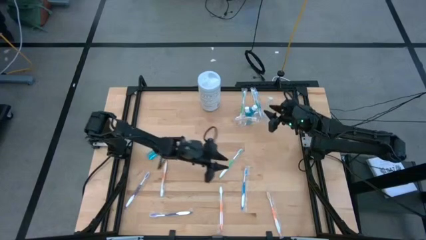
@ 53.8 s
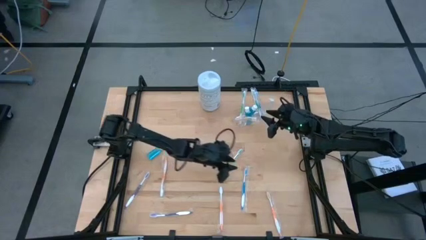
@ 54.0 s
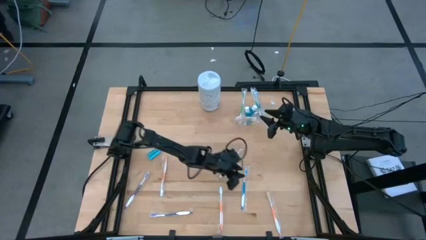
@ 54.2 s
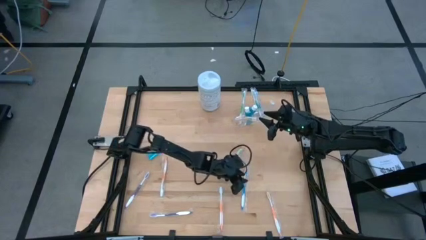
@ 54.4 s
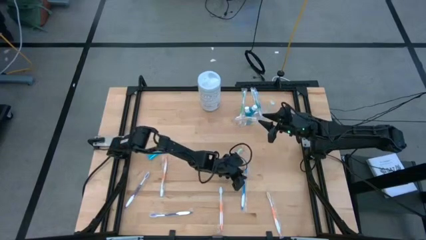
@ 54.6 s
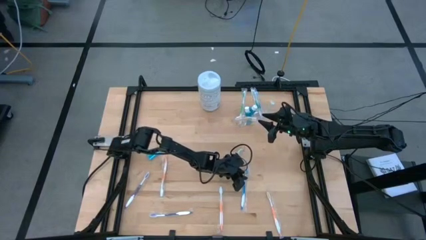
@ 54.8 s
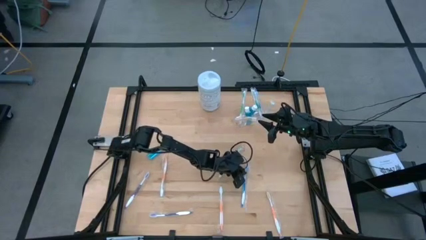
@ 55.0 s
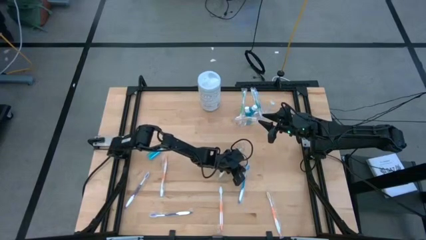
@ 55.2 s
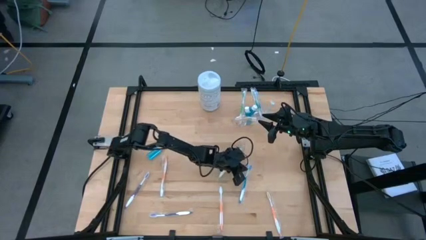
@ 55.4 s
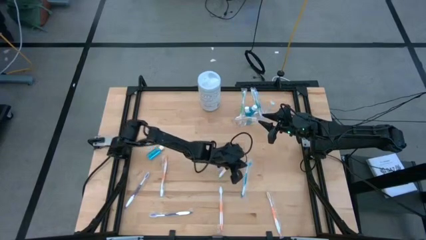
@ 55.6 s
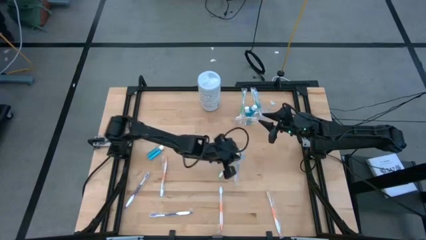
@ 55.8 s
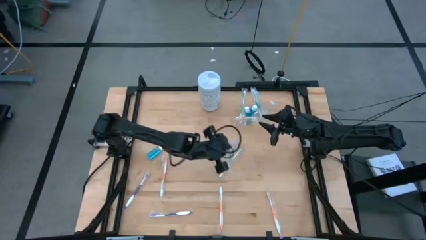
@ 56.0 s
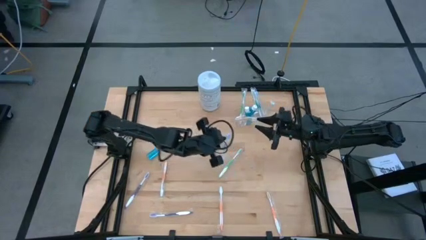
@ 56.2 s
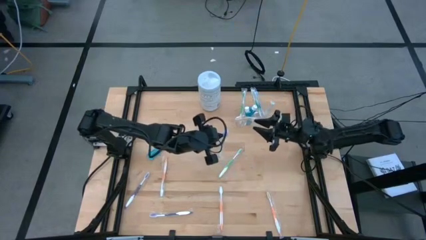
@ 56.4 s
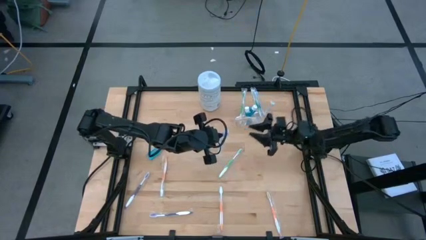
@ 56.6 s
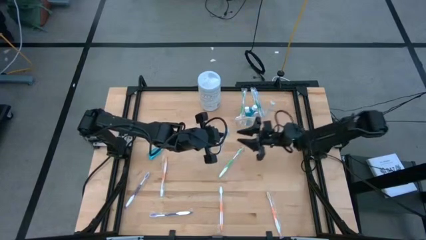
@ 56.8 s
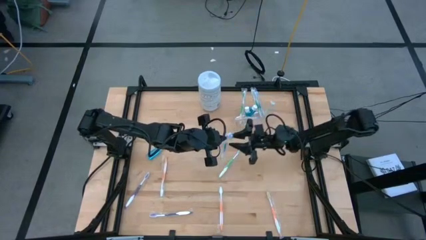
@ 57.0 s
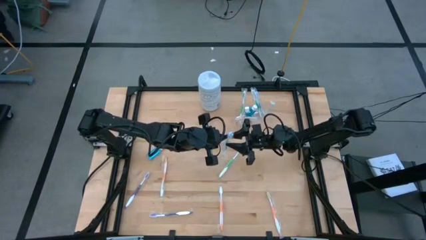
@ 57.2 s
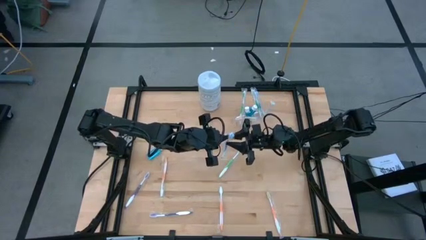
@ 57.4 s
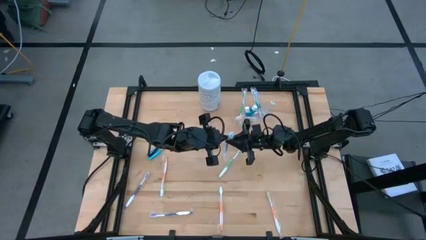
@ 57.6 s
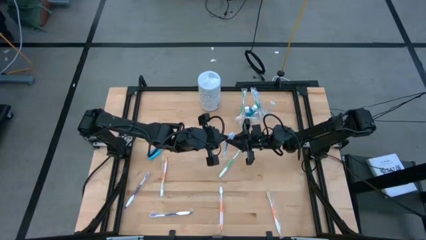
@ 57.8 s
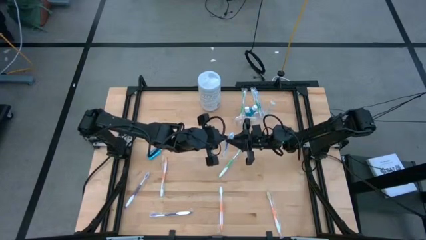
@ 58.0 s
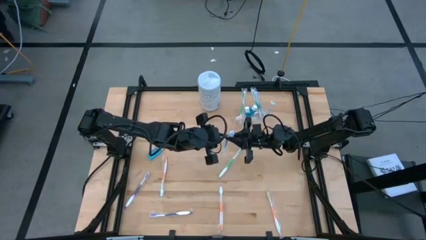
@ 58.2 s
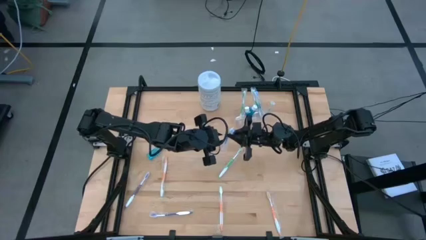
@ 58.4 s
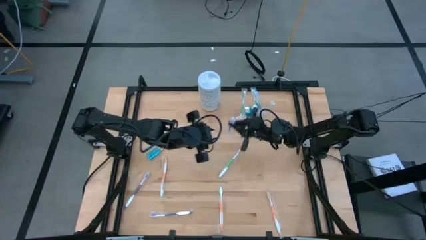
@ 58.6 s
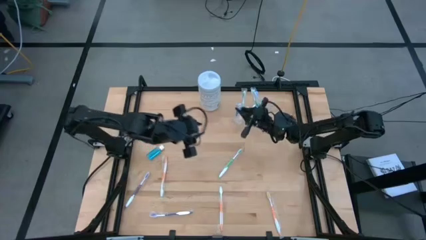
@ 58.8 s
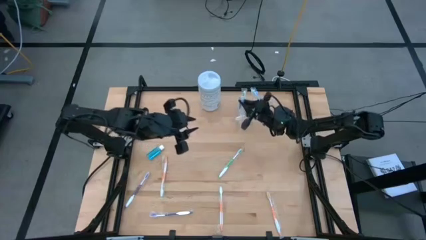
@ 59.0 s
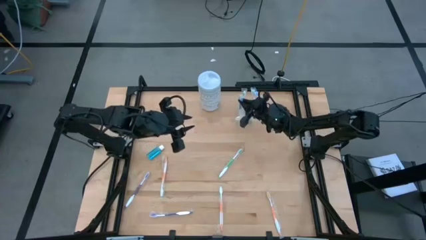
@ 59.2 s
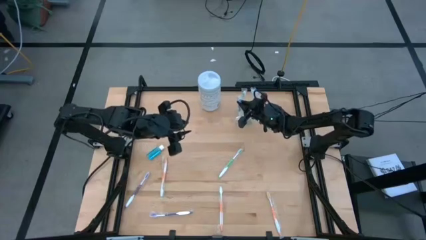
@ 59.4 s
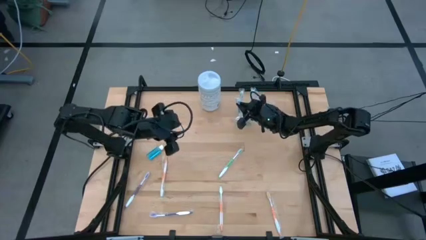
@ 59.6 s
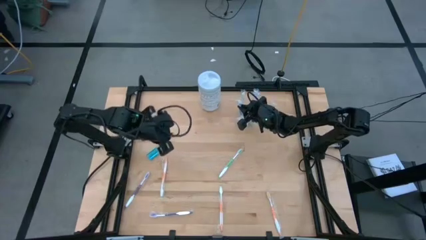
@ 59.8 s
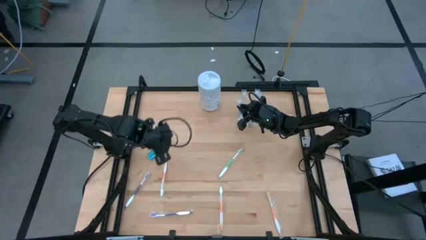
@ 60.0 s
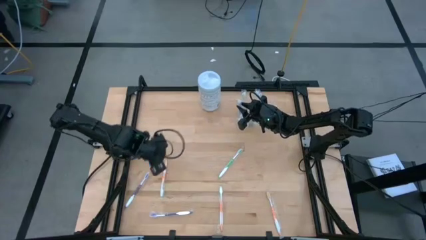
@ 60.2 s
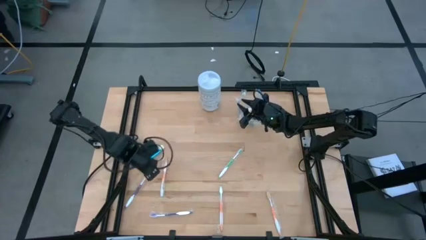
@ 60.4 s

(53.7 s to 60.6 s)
Task: Pick & Place toothbrushing station
Put the white and blue toothbrush into the transparent mesh organizer

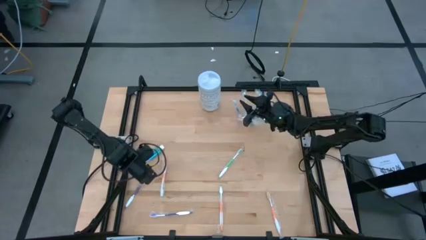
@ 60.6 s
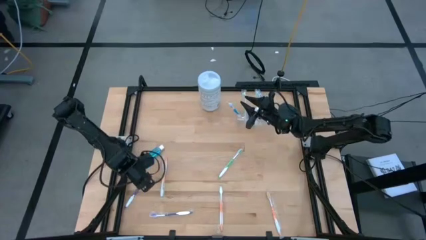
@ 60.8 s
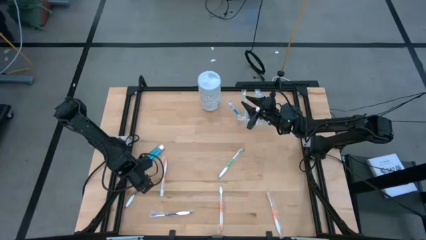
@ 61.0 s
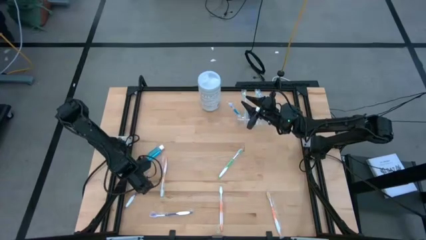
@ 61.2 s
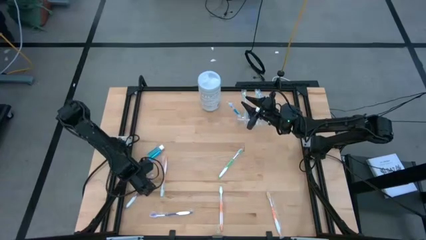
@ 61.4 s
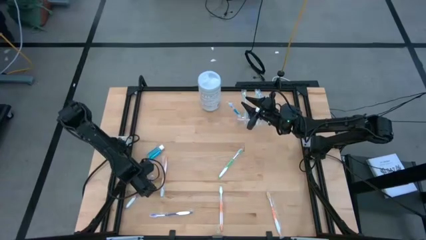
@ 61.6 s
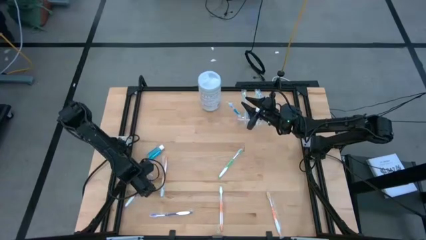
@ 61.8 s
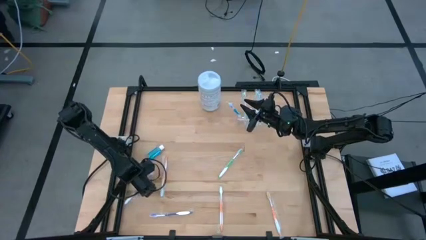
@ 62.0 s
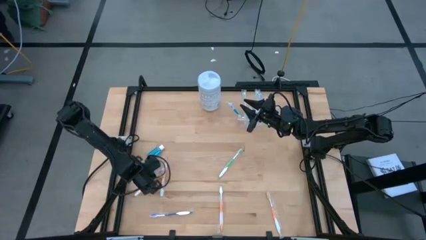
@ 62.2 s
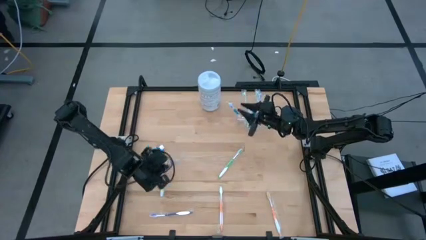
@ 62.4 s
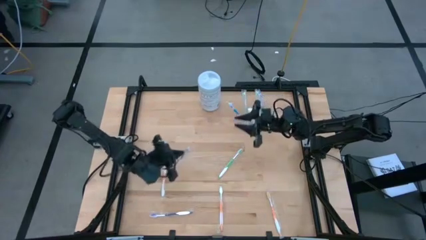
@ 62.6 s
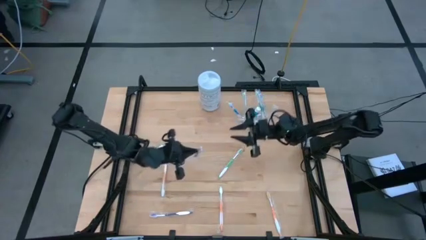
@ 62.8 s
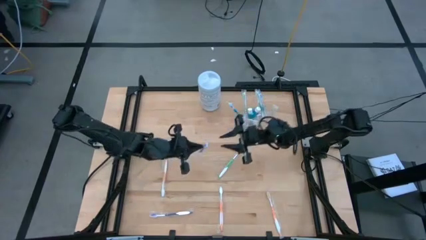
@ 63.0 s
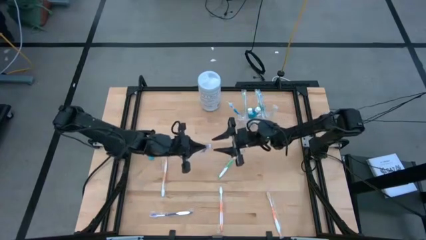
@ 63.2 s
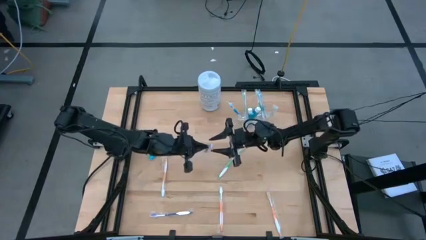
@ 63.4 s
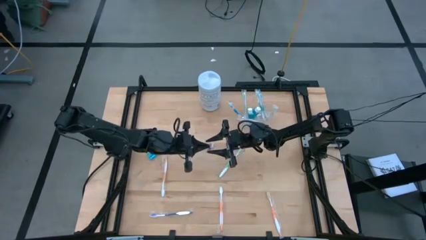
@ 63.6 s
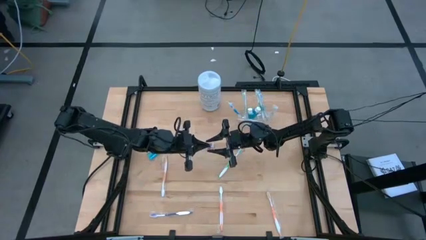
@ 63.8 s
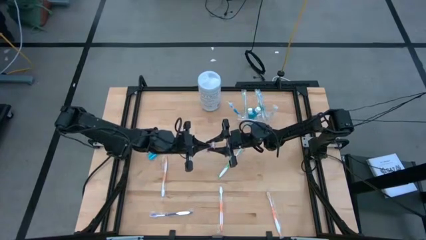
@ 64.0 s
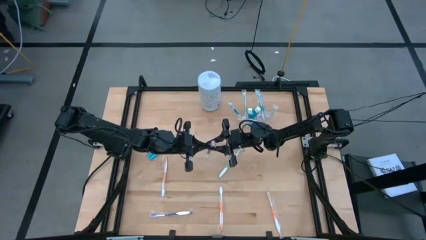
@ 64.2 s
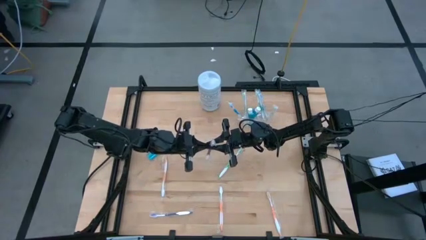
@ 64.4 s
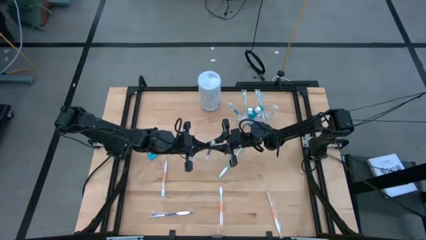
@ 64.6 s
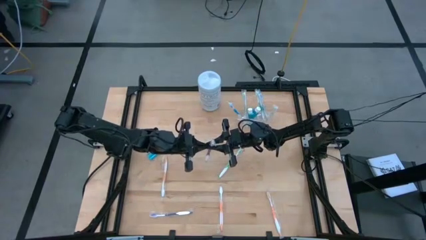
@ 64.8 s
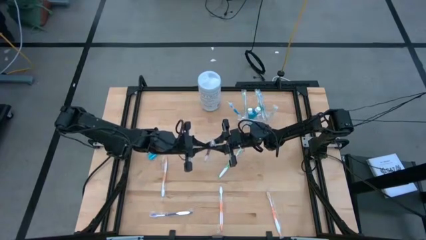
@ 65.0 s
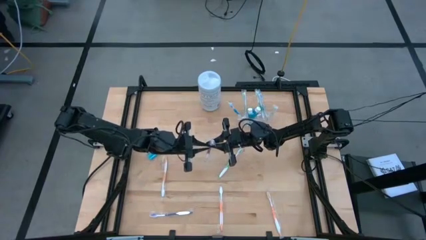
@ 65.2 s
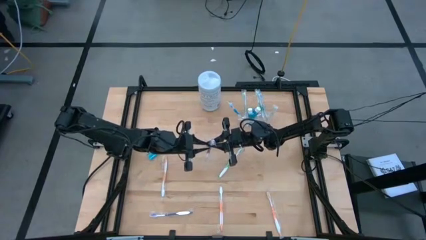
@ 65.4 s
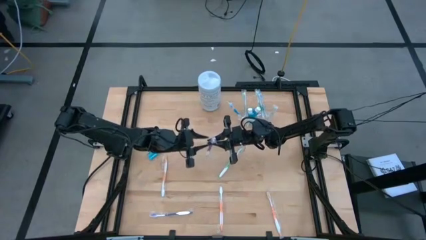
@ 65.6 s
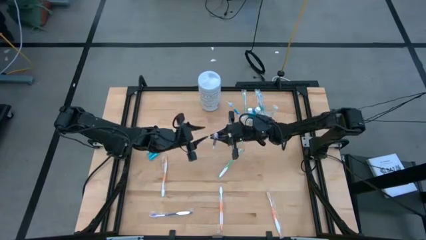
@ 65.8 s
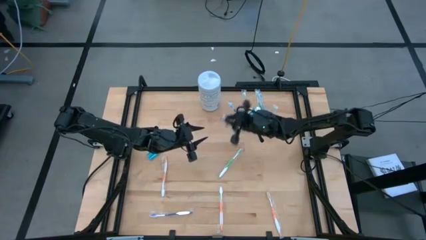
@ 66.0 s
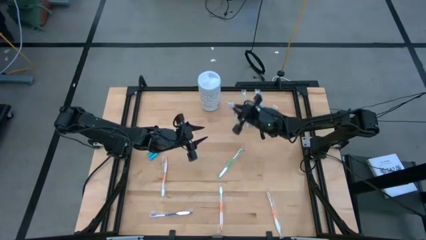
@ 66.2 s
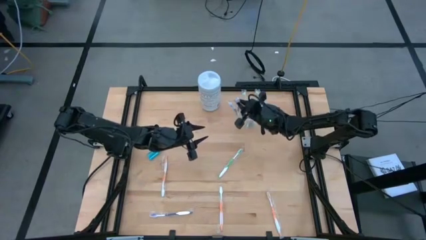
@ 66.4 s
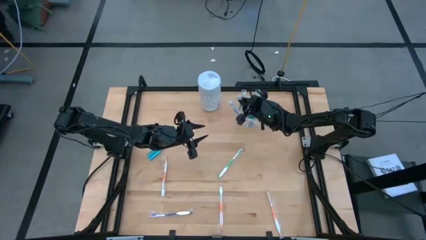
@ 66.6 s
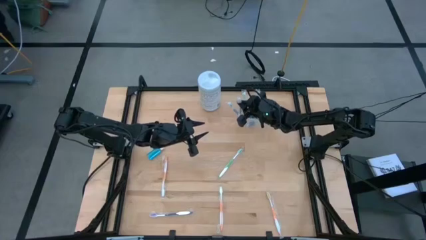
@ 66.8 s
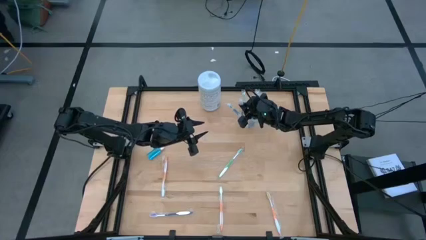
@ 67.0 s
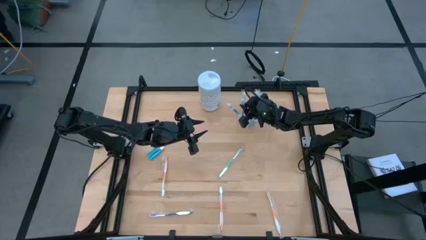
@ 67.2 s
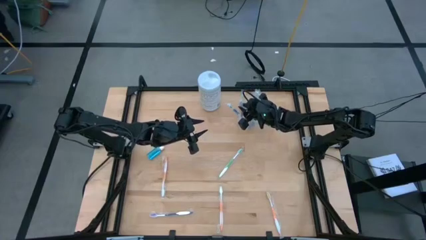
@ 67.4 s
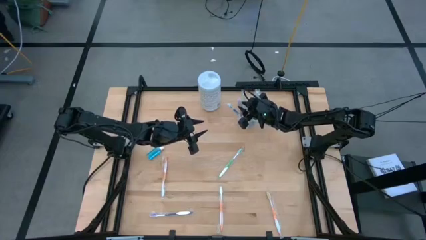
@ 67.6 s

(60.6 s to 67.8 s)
Put the white and purple toothbrush into the transparent mesh organizer

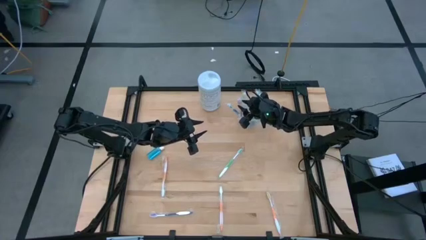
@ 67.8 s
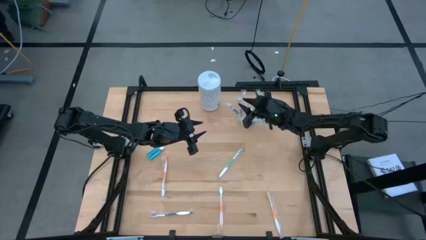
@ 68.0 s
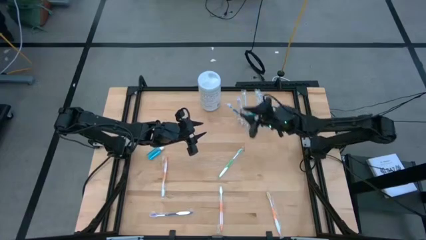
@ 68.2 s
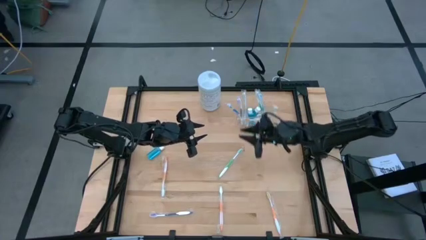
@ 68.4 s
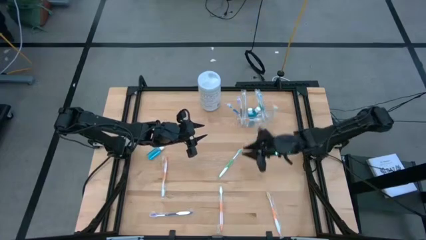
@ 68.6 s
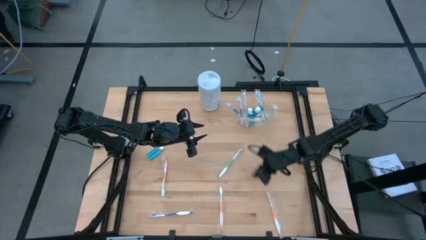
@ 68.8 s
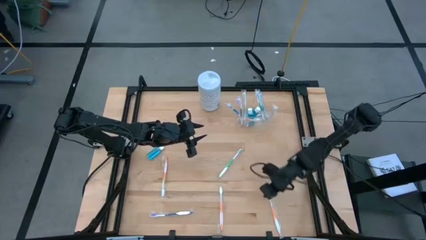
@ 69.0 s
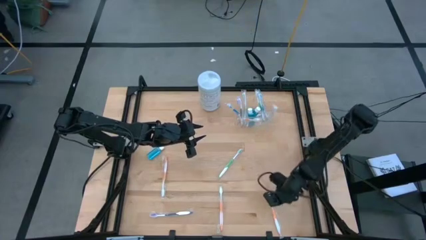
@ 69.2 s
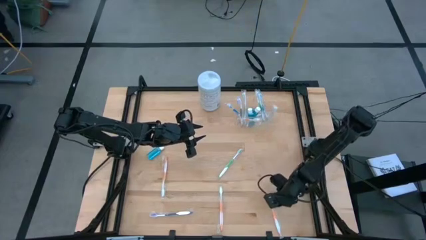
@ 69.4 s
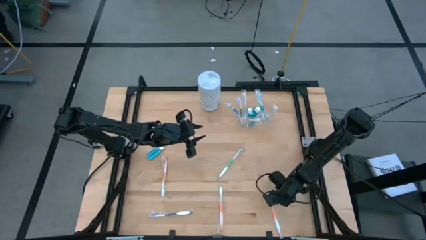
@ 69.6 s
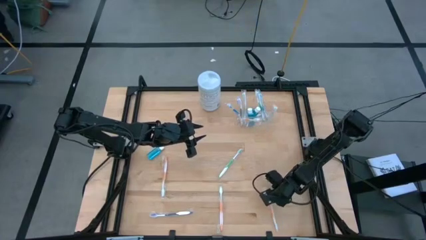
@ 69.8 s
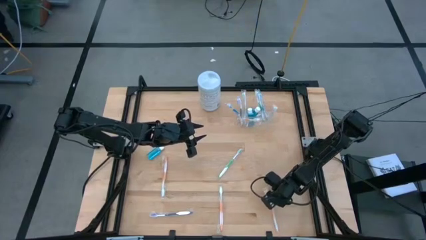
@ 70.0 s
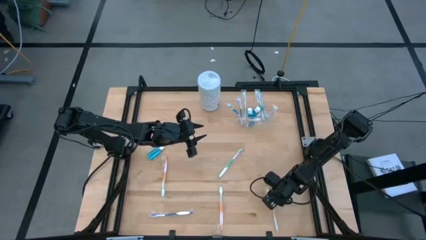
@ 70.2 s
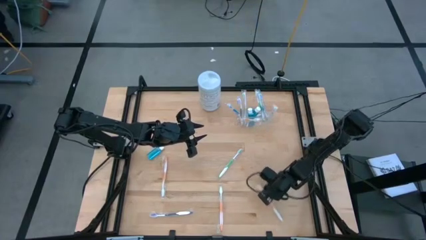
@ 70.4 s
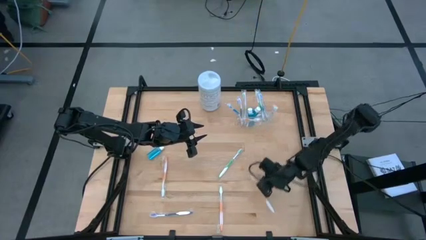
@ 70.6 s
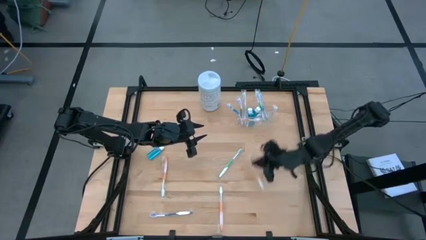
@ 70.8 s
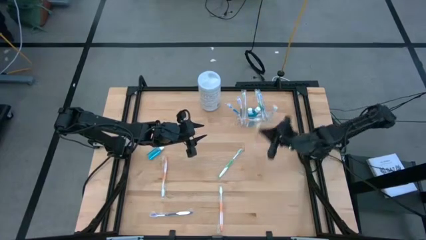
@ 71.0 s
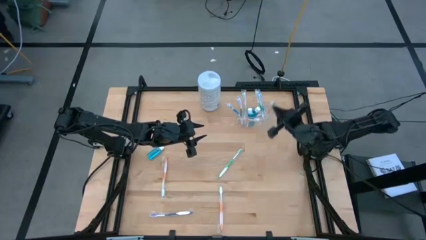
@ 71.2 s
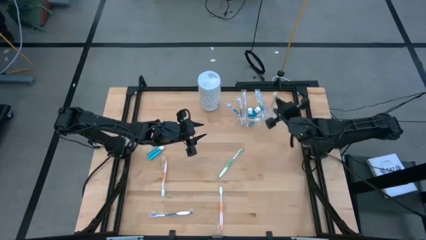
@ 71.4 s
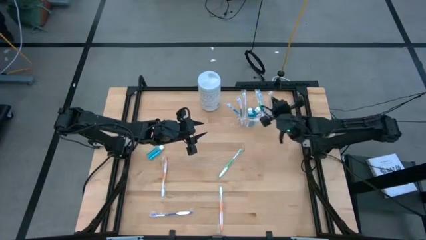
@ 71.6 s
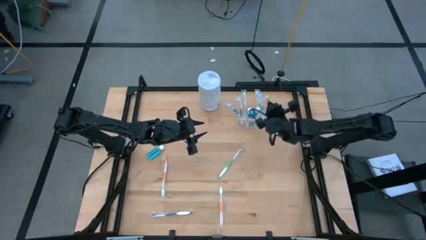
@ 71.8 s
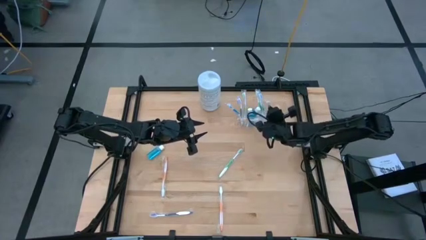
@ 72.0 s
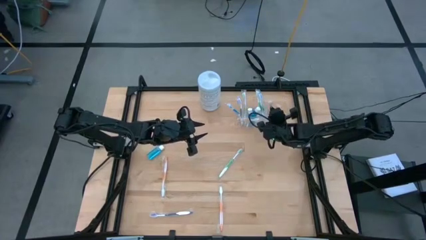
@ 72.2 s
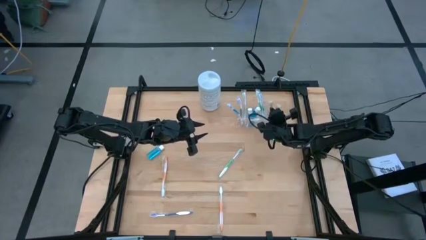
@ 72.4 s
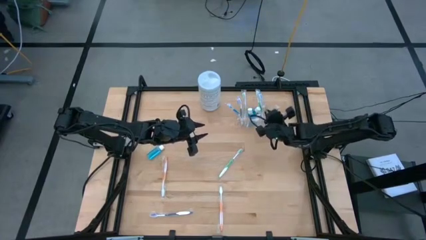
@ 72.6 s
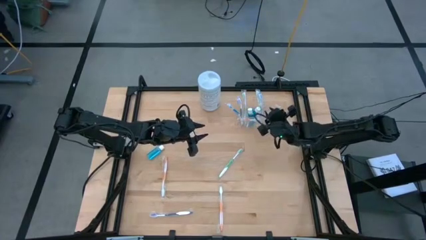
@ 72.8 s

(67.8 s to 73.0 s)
Put the white and orange toothbrush into the transparent mesh organizer
